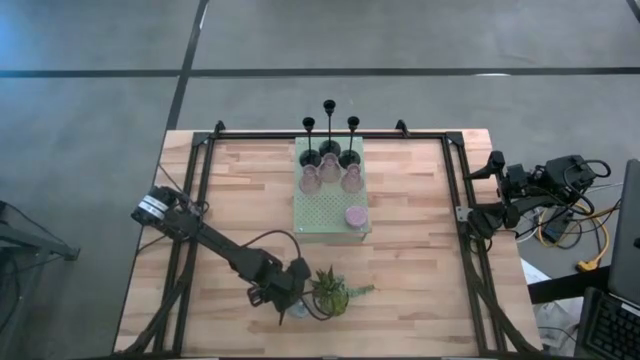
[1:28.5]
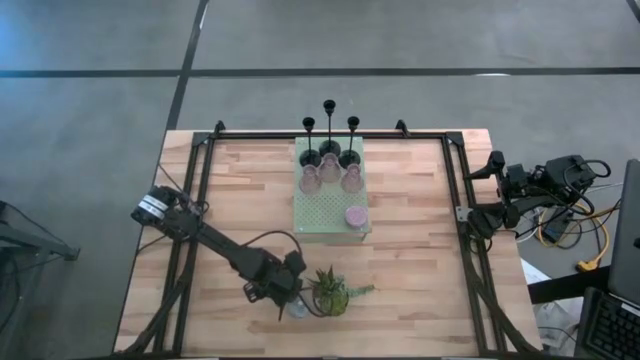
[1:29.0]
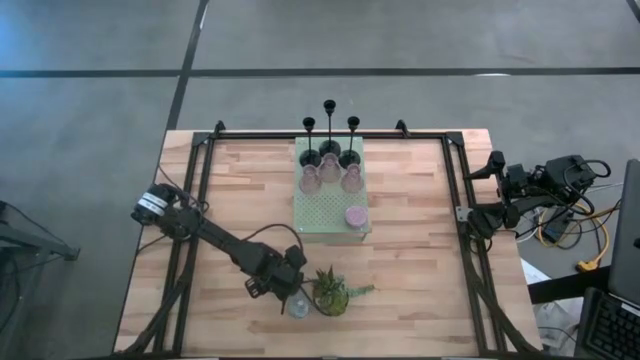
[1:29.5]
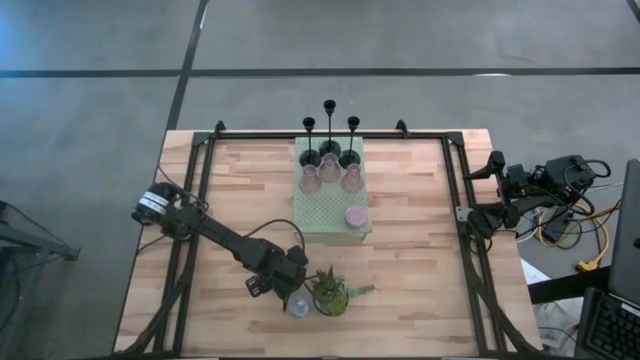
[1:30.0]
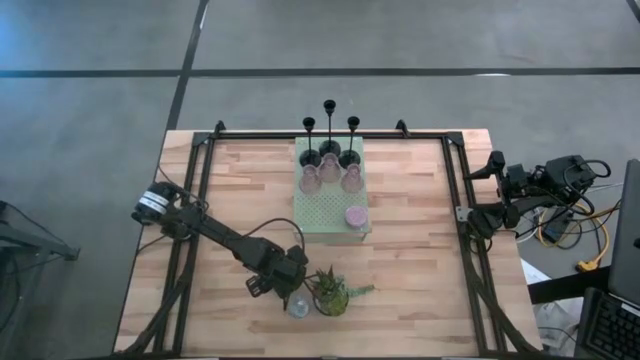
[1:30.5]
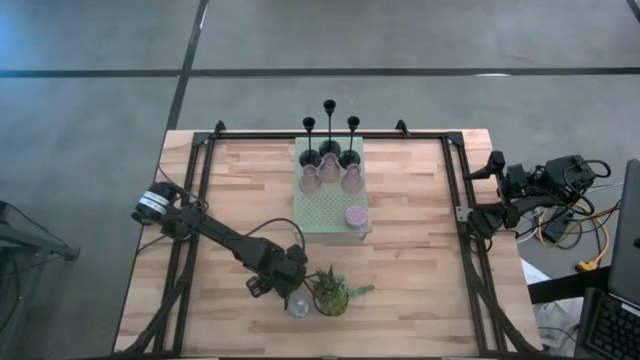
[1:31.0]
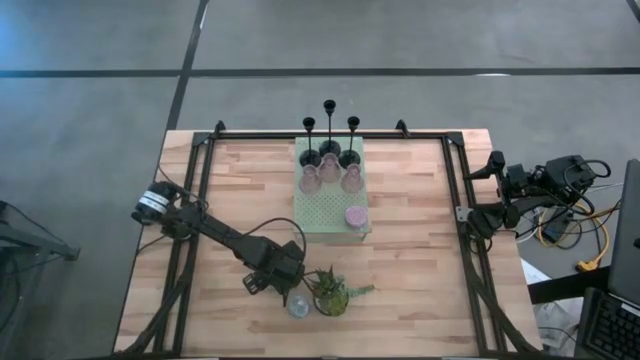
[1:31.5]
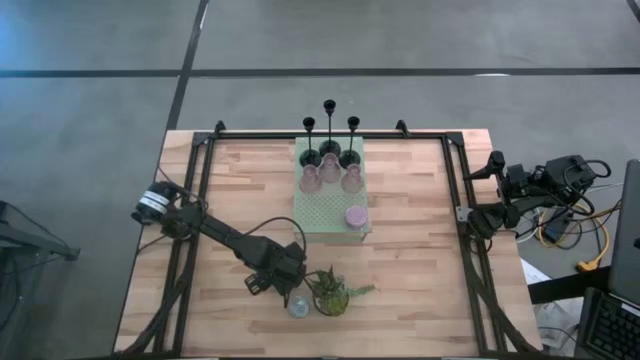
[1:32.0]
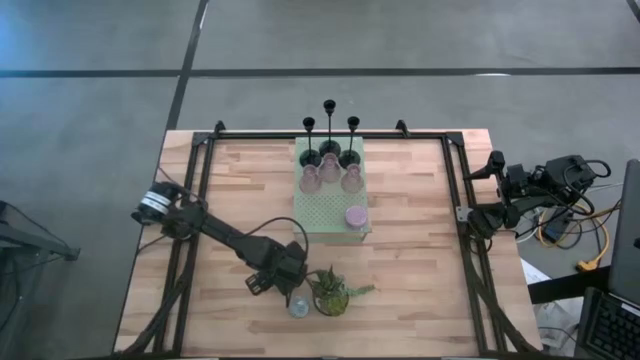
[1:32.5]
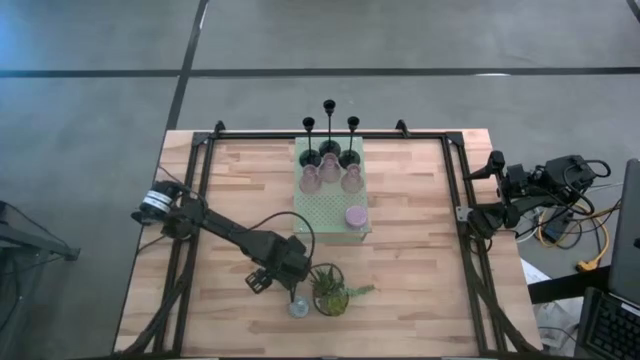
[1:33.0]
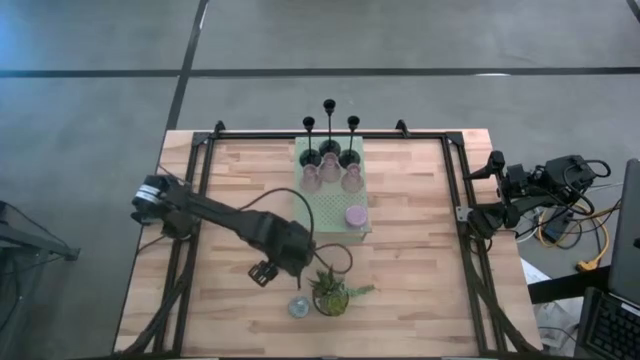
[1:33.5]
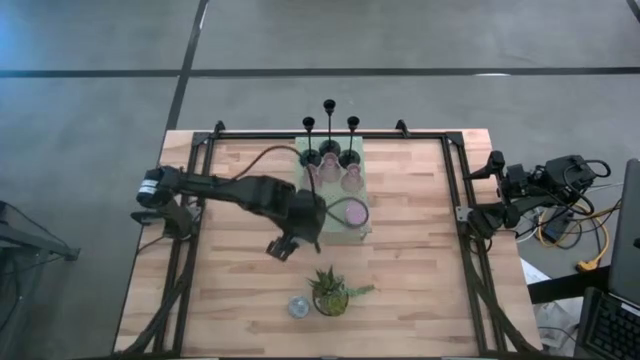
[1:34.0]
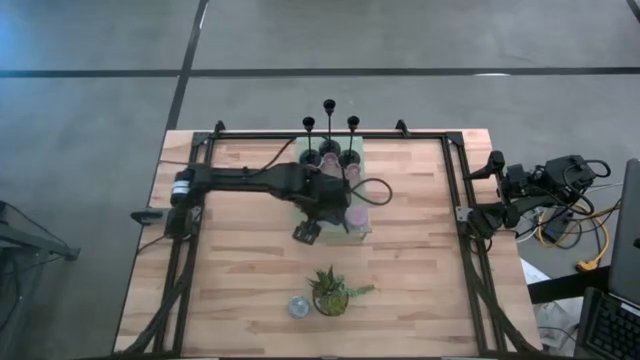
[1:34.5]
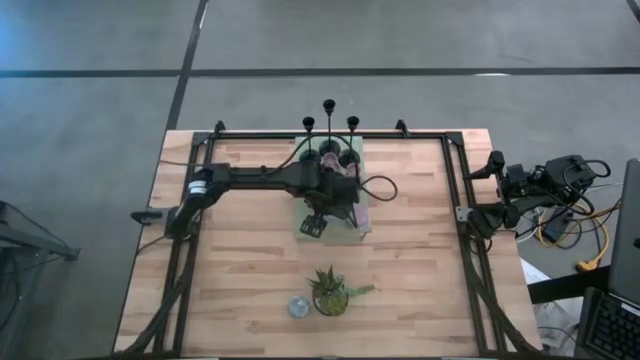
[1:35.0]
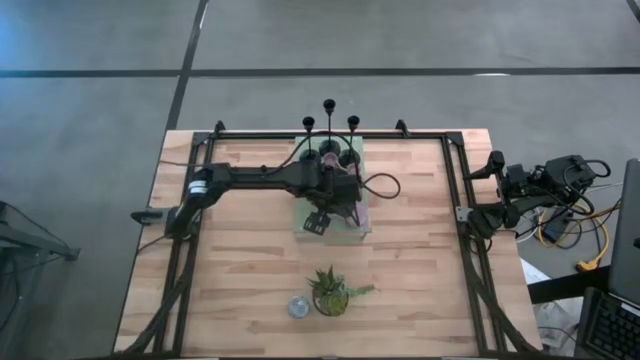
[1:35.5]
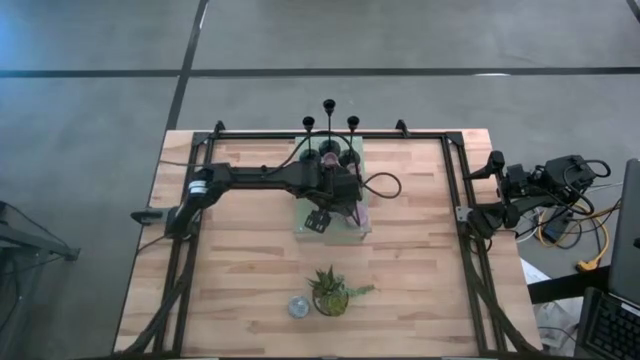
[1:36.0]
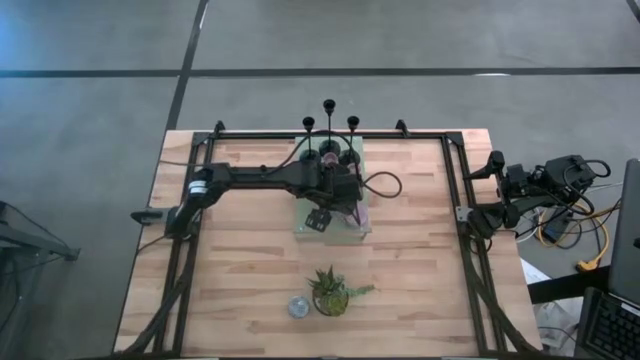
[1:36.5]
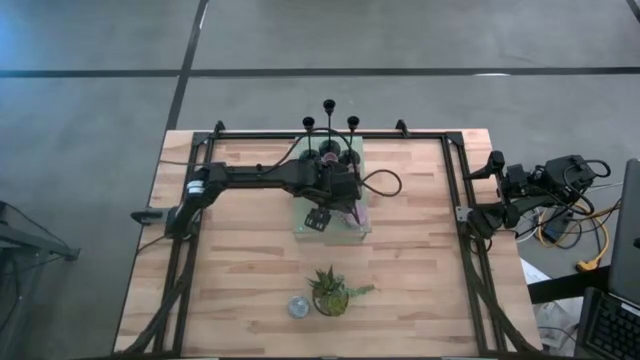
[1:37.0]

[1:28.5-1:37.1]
Task: Pick & Place candle stick holders
Put the red patterned scented candle on the shelf

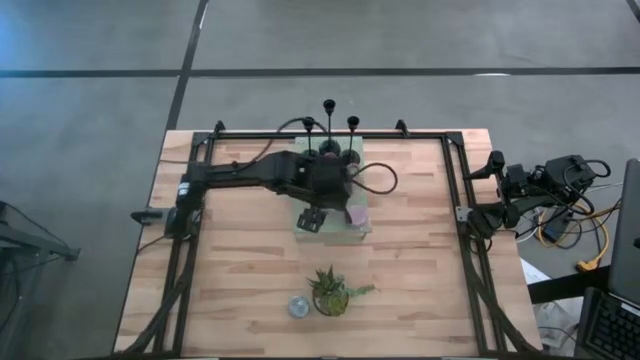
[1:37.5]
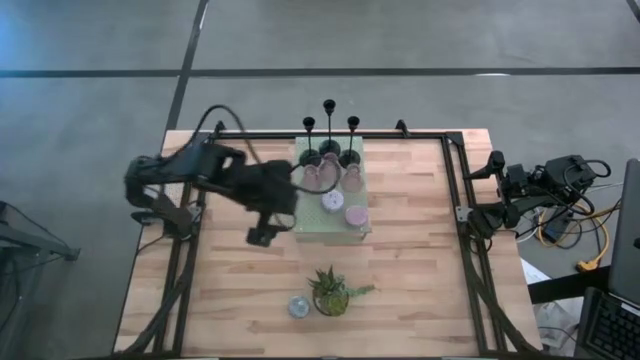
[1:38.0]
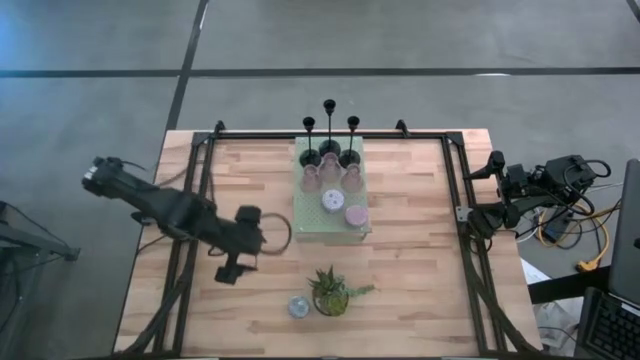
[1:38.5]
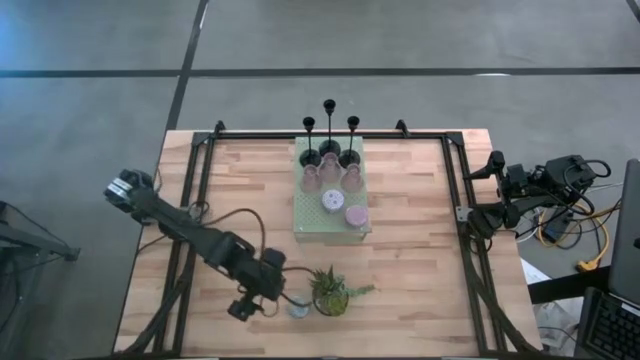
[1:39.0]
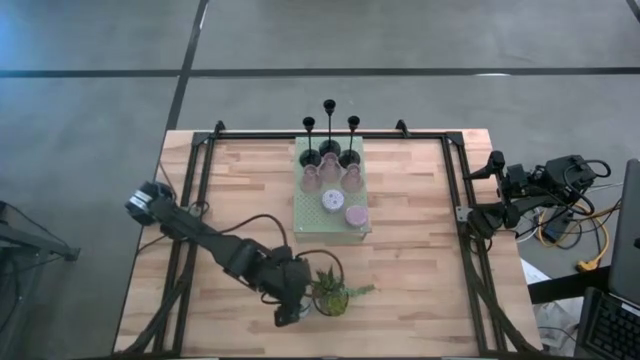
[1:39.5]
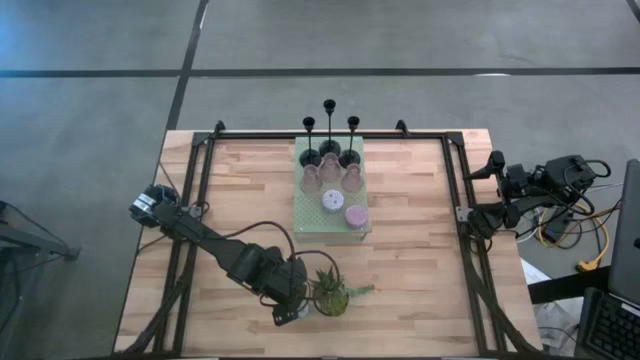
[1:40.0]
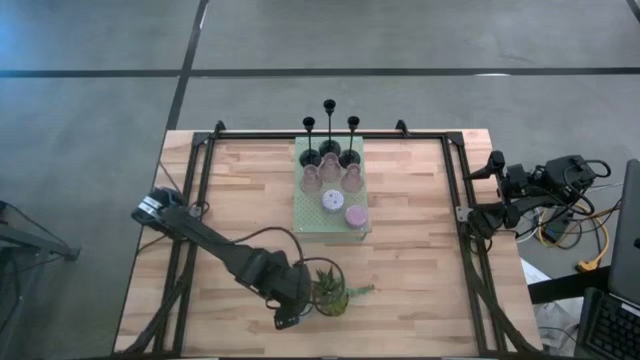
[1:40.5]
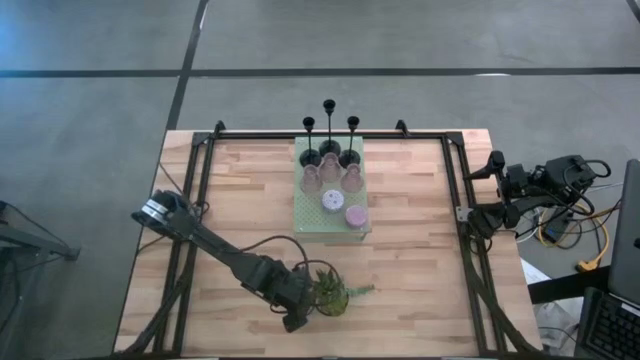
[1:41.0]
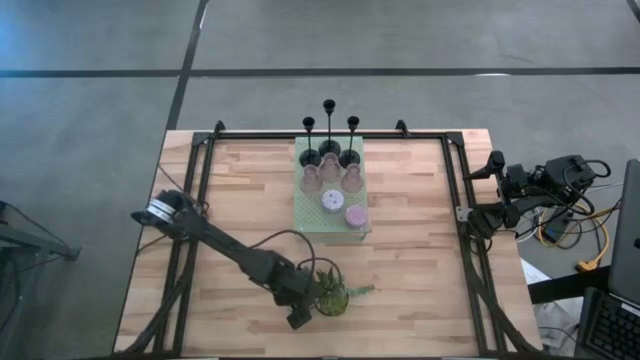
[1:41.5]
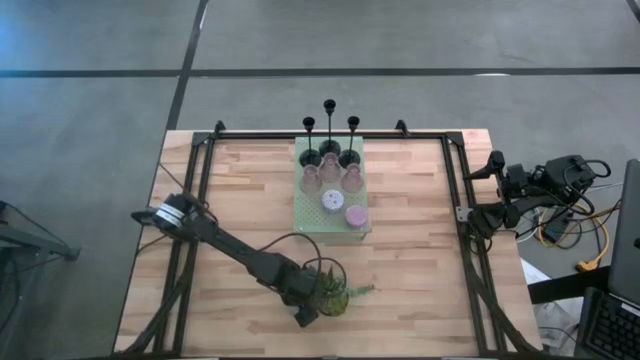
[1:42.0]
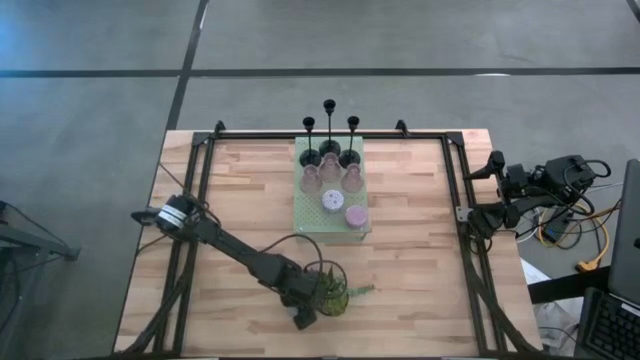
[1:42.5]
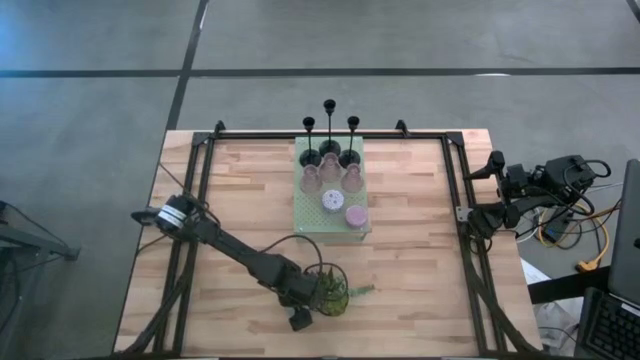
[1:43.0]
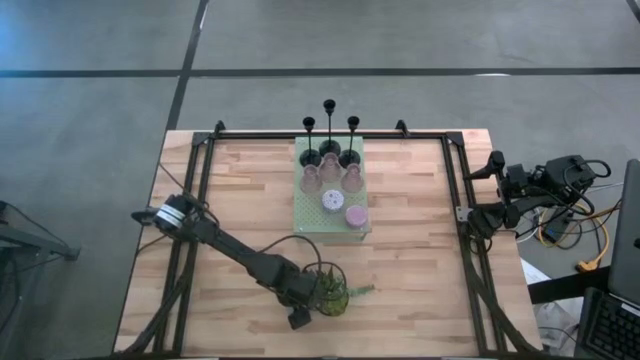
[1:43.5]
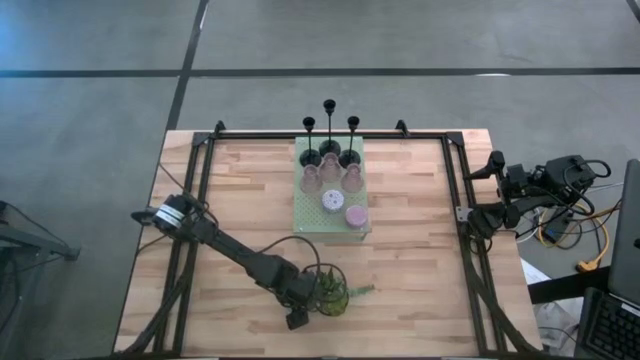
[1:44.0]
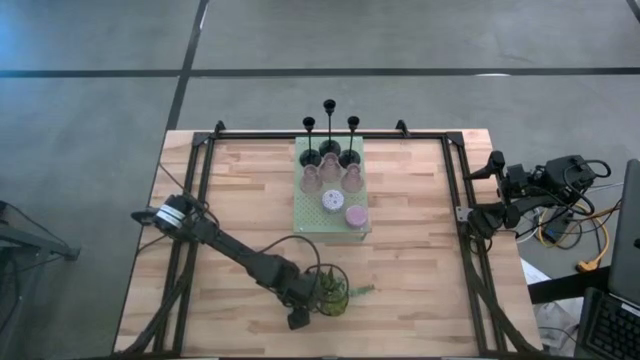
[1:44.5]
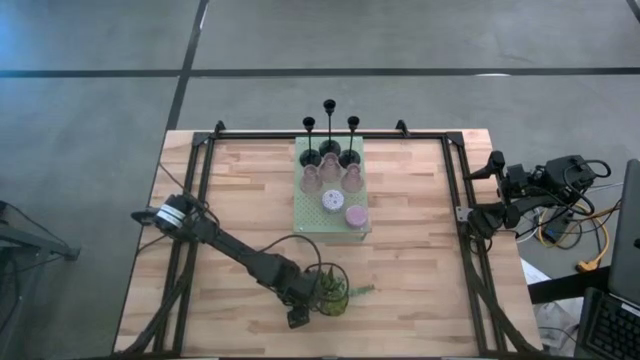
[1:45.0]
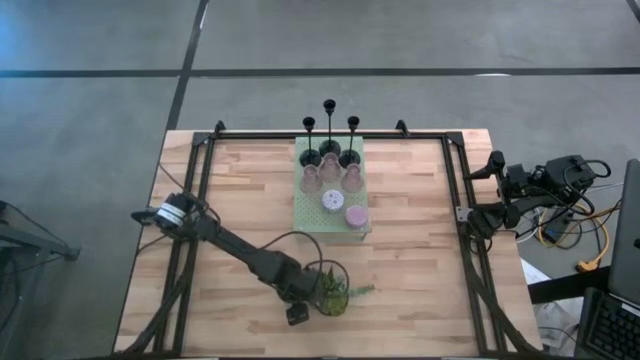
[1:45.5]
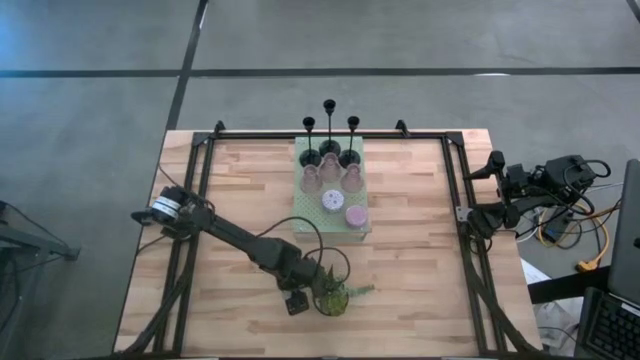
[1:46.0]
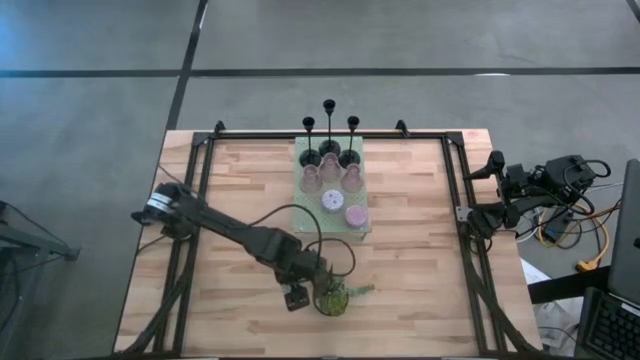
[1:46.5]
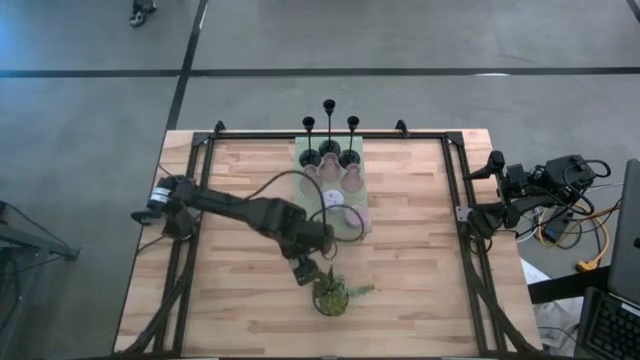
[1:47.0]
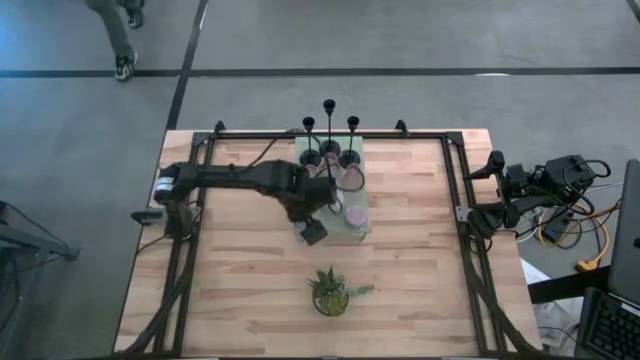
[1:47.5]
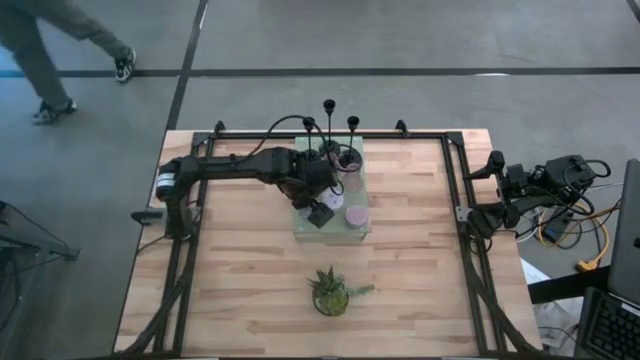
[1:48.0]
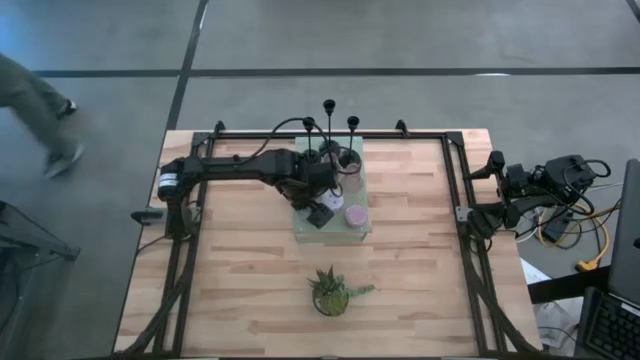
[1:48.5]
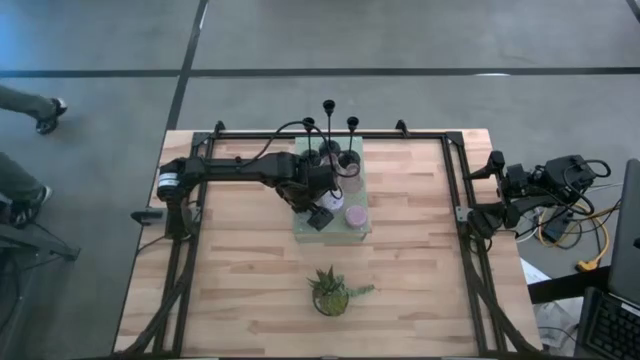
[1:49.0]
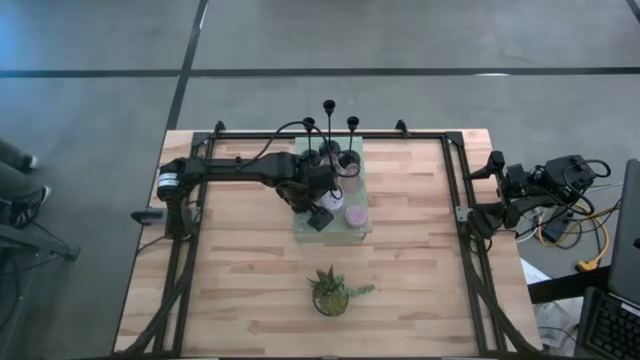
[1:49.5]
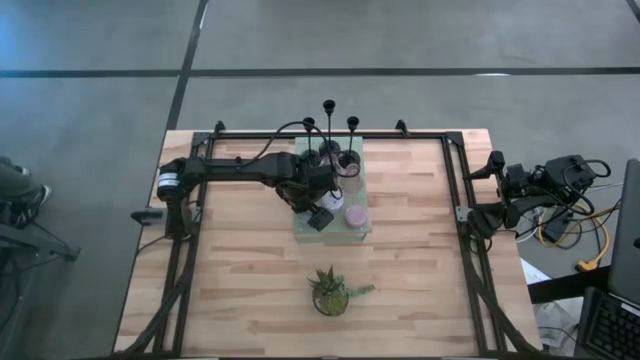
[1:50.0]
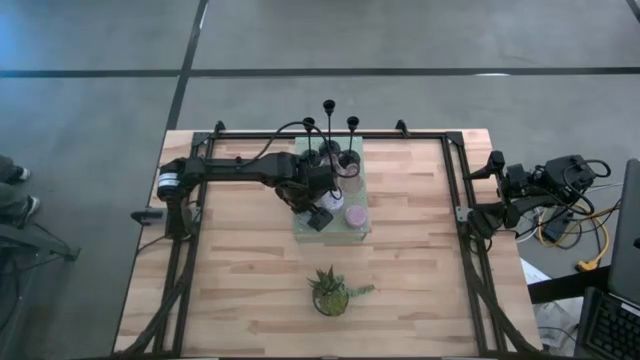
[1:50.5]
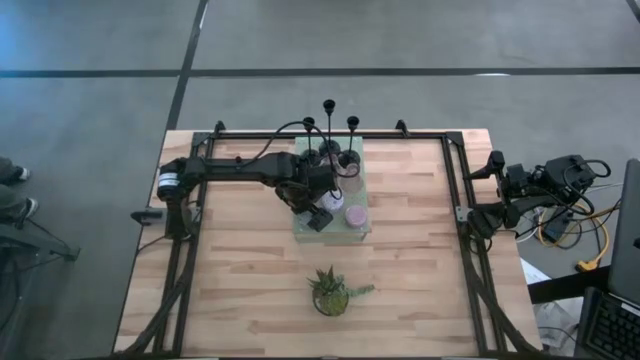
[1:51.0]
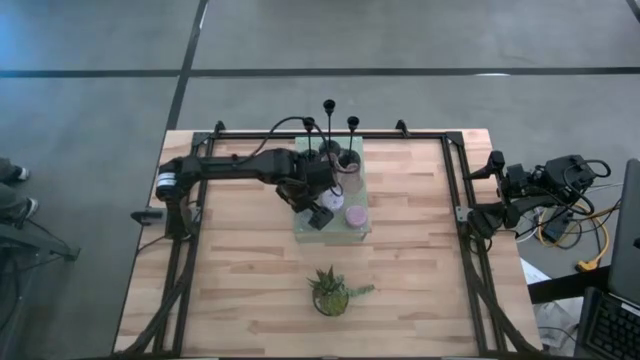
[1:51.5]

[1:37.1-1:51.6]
Put the green patterned scented candle on the shelf
